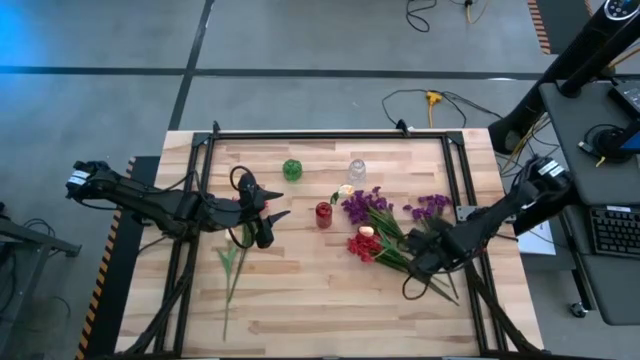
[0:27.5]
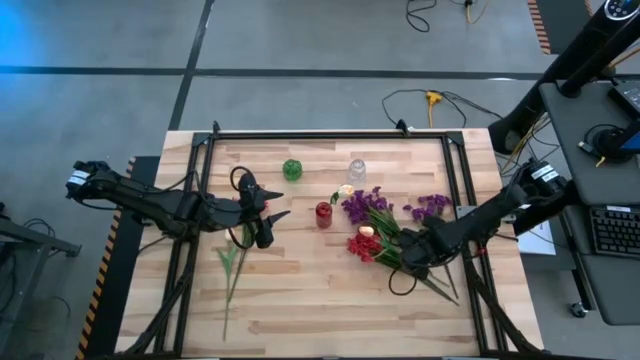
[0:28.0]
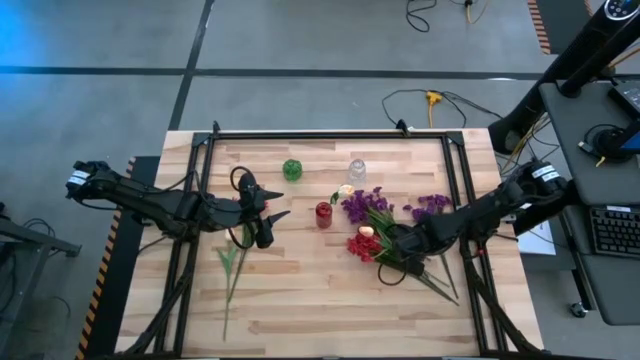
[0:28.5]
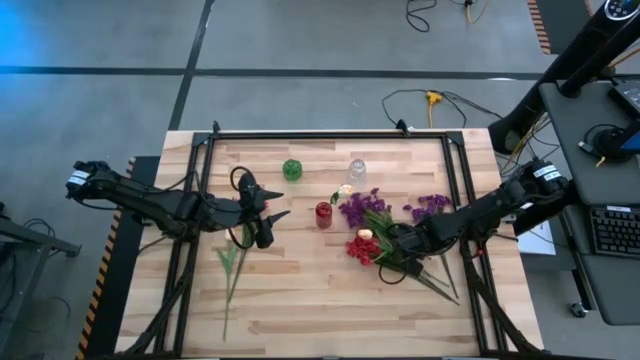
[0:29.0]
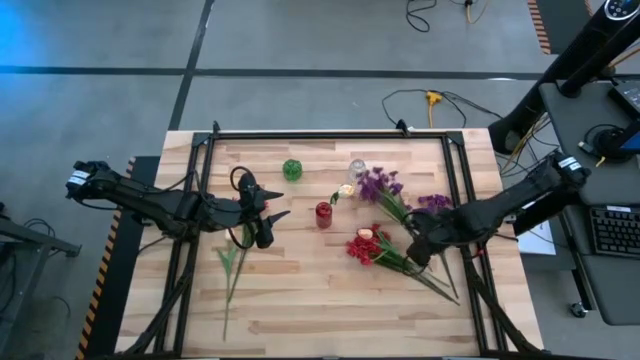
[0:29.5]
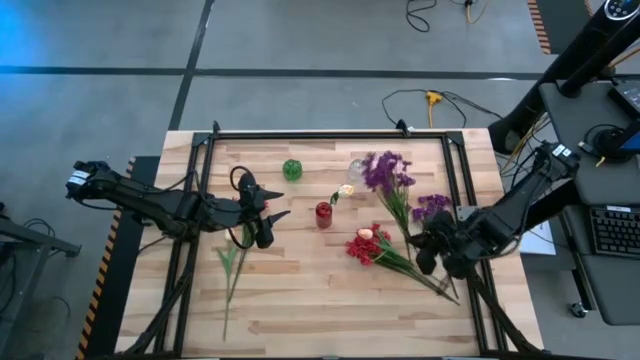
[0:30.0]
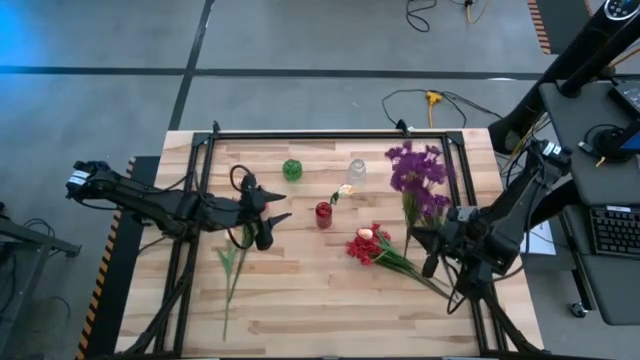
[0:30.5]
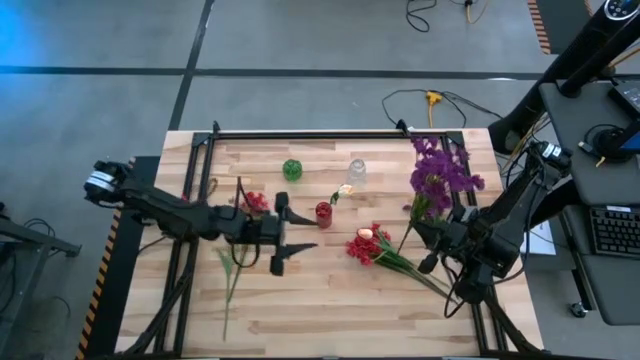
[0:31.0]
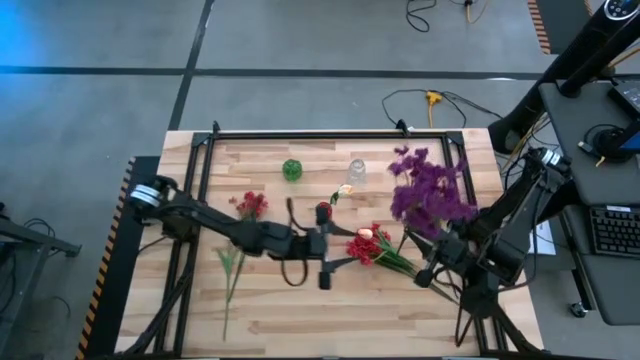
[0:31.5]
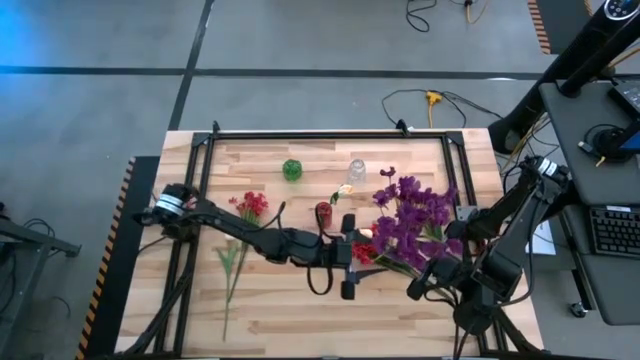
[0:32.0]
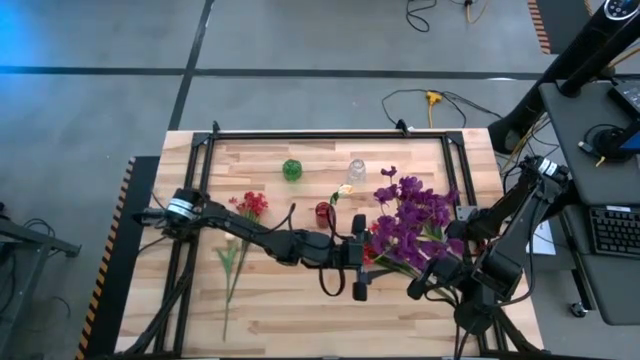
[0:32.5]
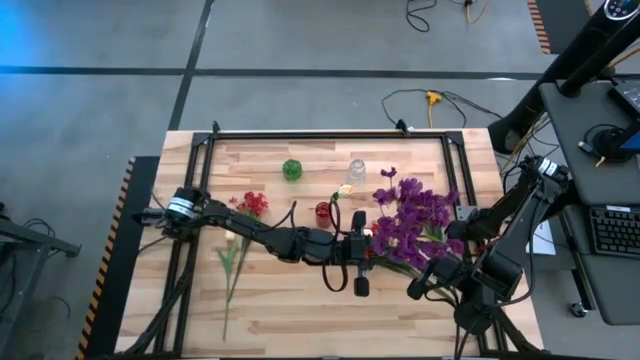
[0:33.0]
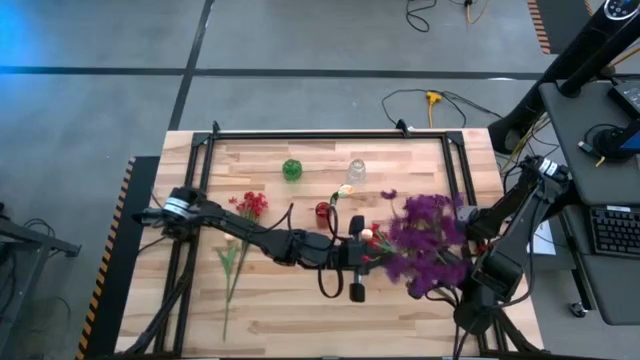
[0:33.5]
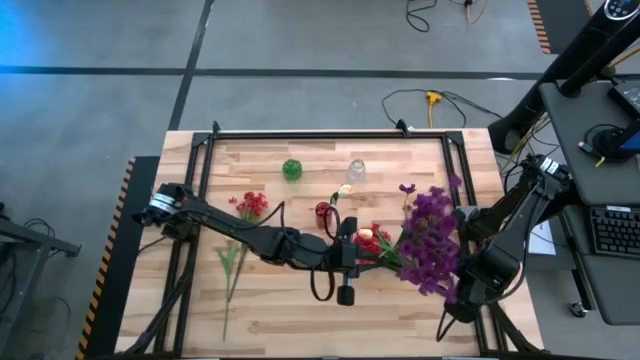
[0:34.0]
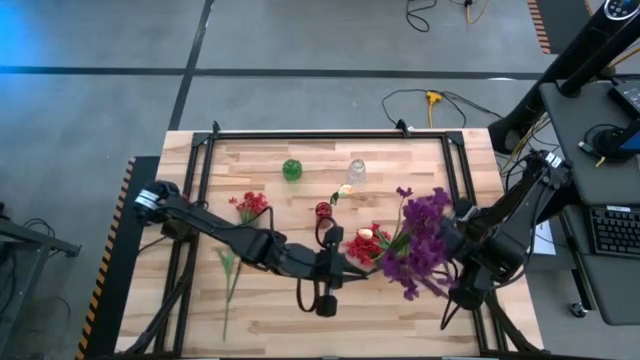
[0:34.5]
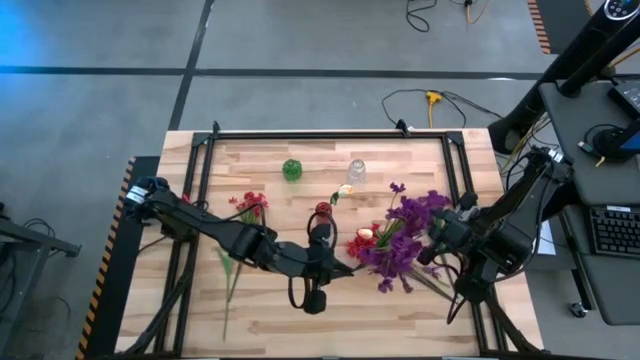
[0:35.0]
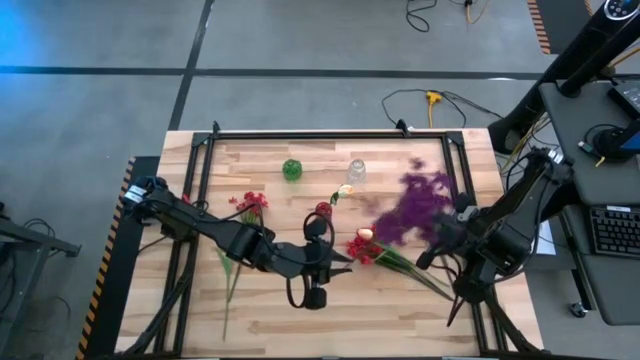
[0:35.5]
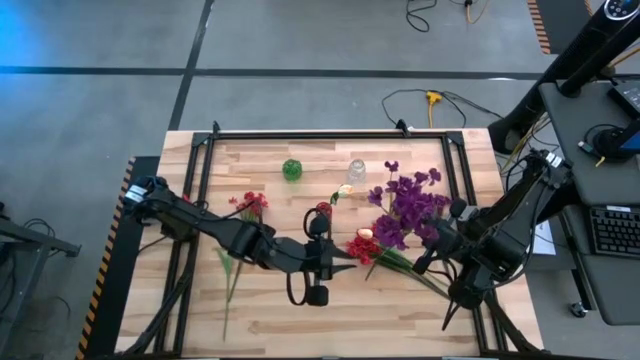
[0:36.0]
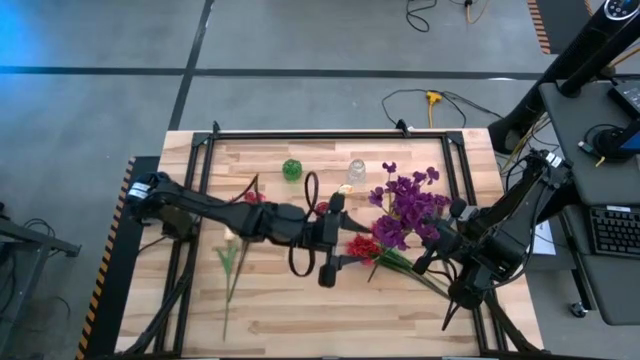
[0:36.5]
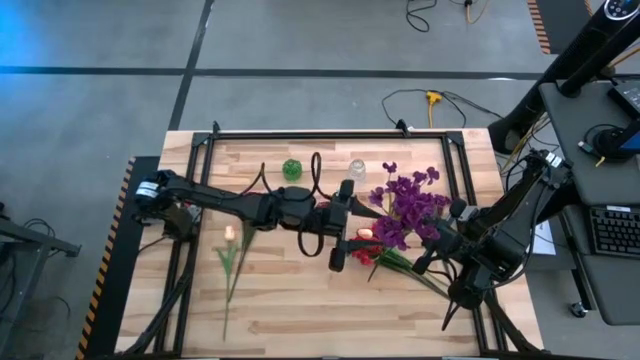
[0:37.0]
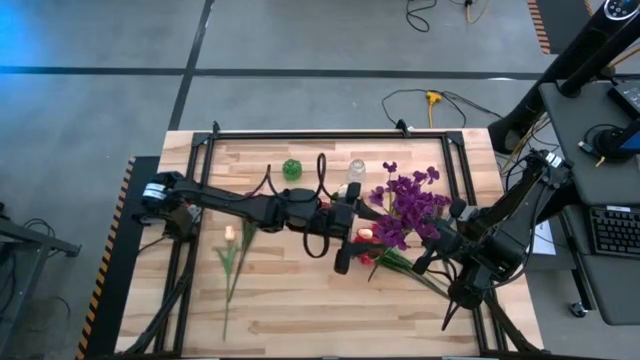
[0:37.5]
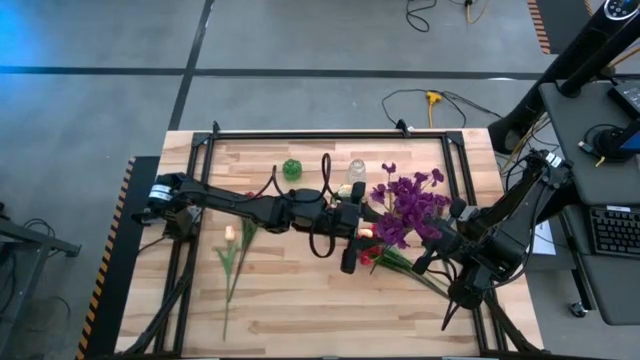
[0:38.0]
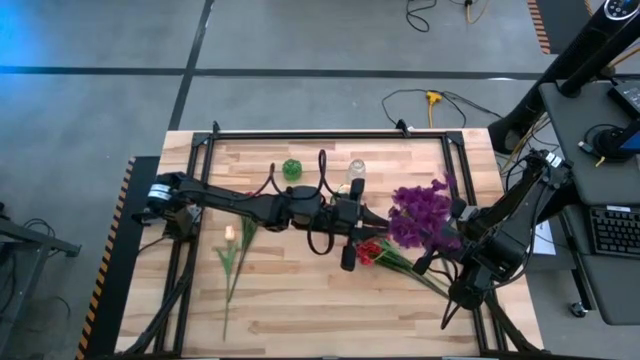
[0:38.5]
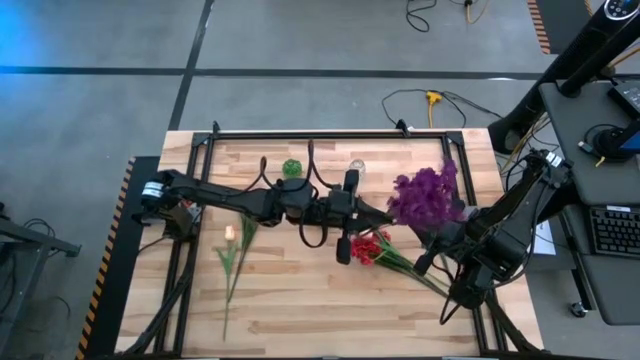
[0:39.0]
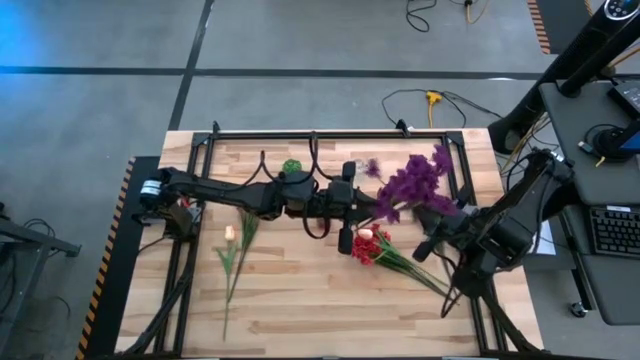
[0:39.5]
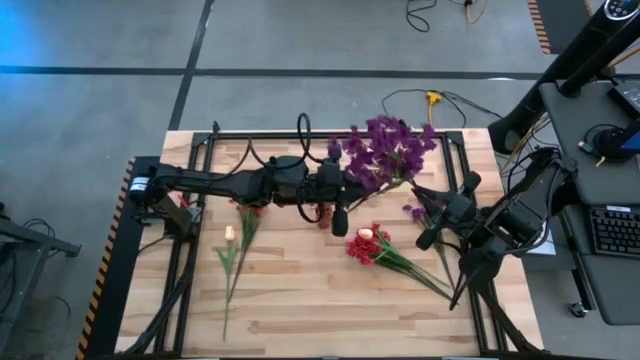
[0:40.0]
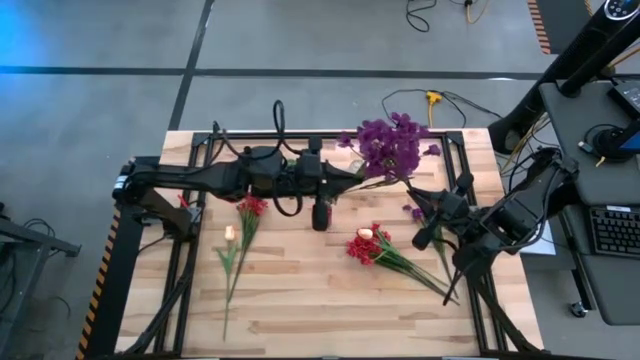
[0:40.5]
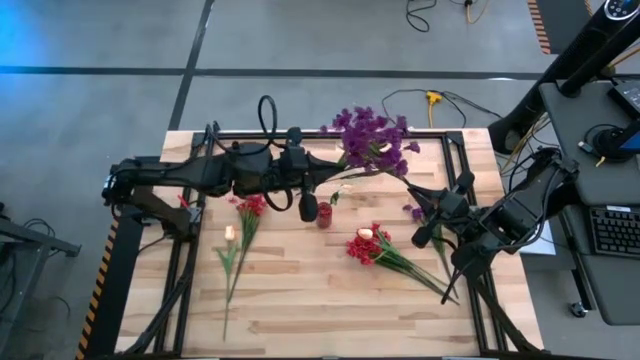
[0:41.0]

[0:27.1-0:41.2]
Task: Sort flowers into vase by color
Put the purple flowers into the transparent vase

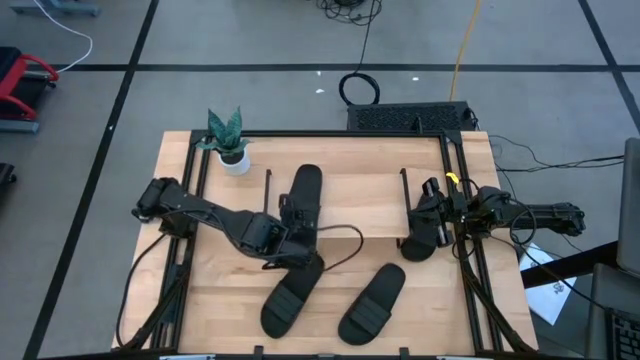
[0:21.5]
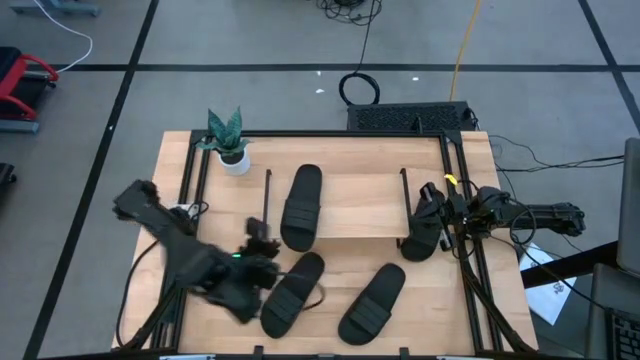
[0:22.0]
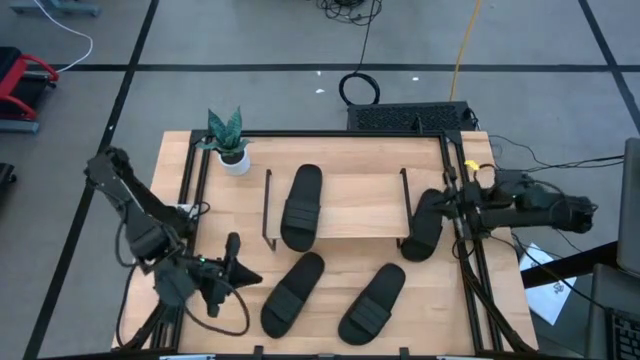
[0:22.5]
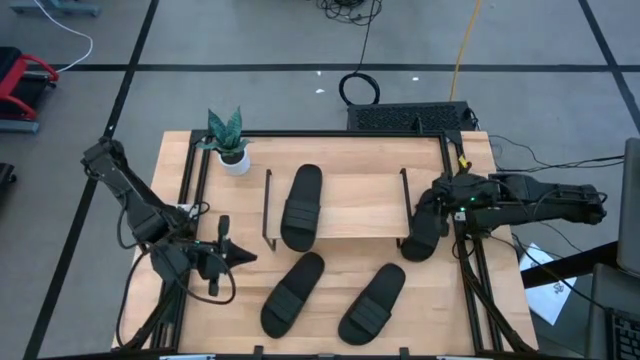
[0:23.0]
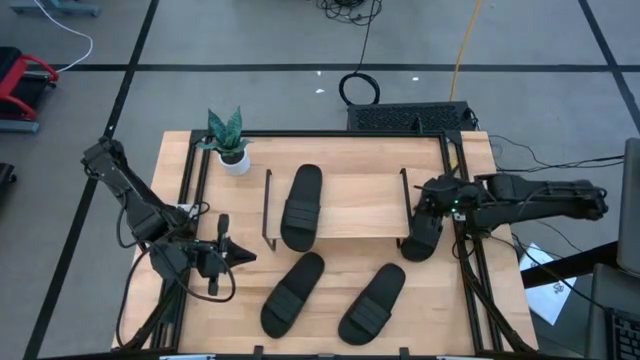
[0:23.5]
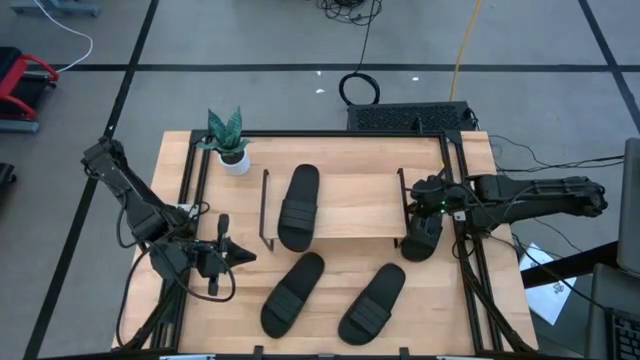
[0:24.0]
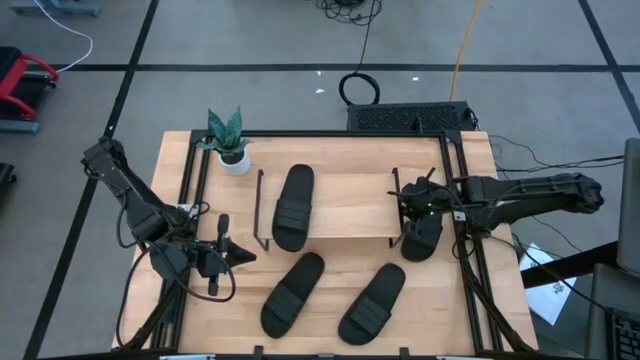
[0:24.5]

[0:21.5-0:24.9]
Task: Pick and place slides into the shelf
Adjust the shelf
